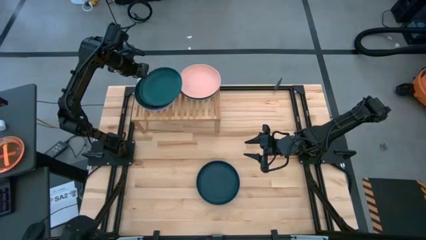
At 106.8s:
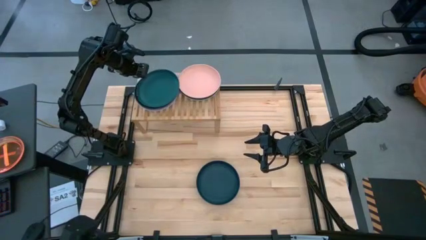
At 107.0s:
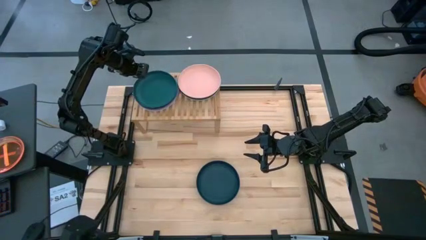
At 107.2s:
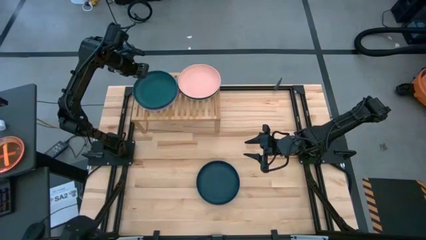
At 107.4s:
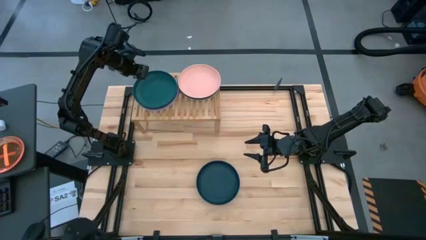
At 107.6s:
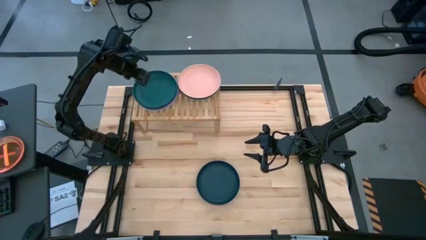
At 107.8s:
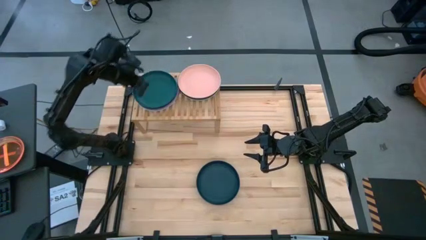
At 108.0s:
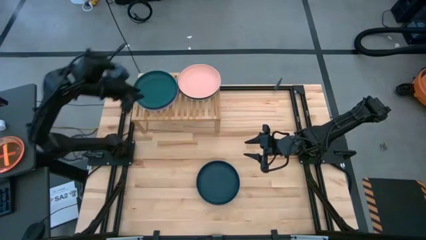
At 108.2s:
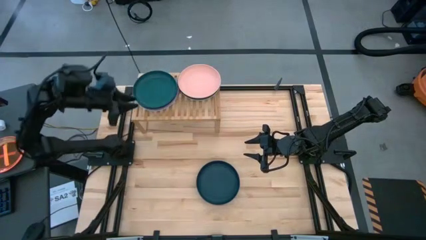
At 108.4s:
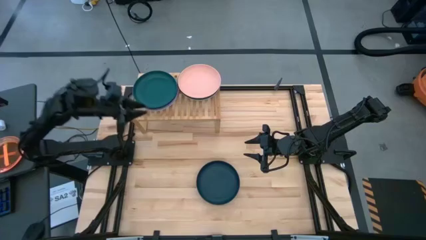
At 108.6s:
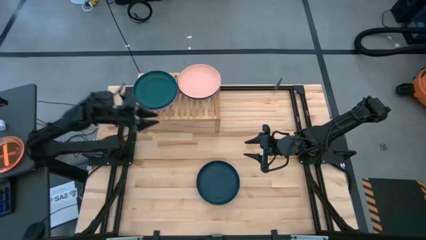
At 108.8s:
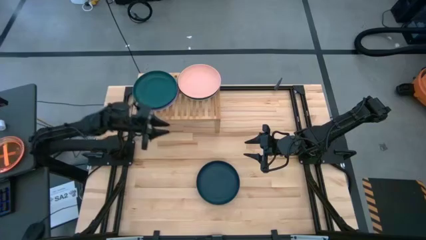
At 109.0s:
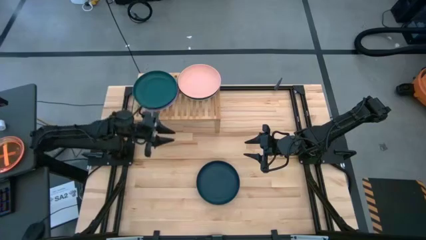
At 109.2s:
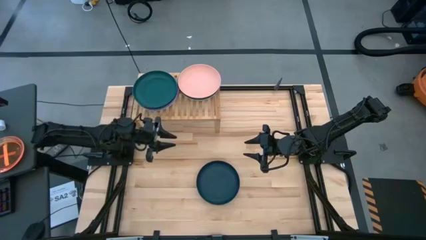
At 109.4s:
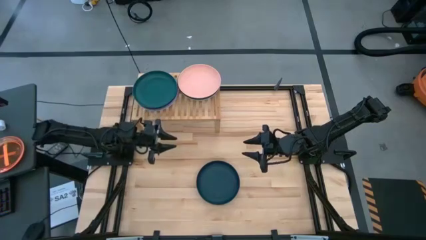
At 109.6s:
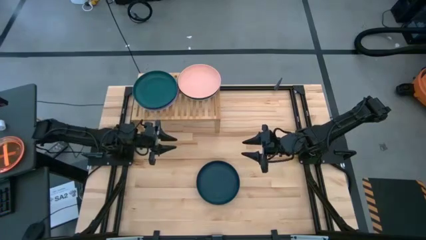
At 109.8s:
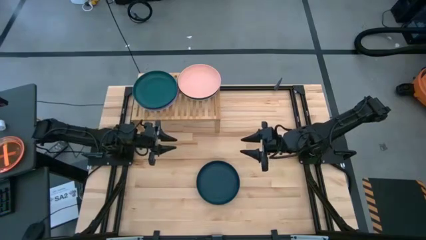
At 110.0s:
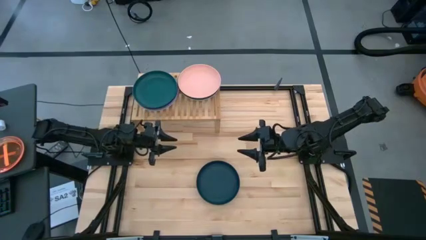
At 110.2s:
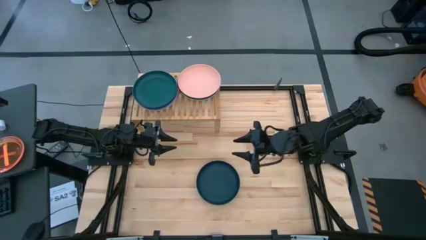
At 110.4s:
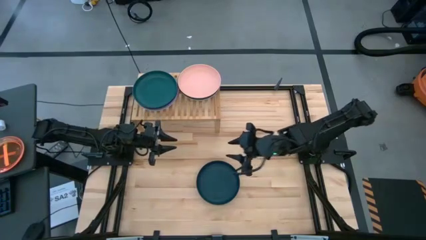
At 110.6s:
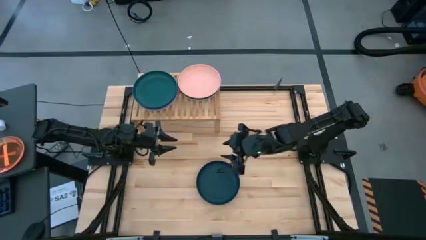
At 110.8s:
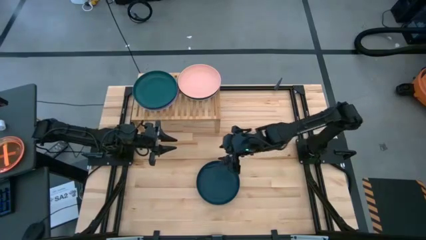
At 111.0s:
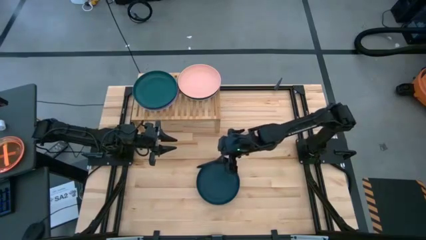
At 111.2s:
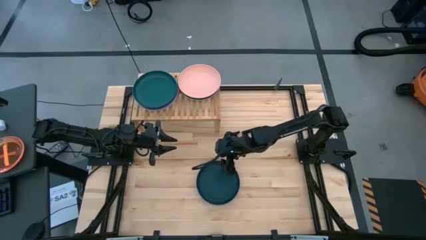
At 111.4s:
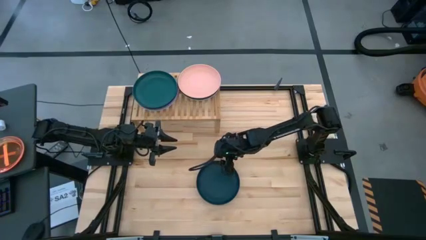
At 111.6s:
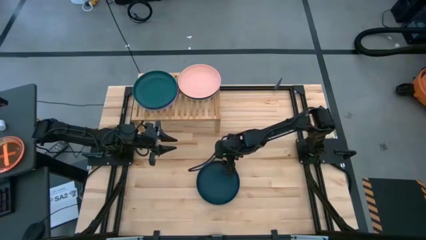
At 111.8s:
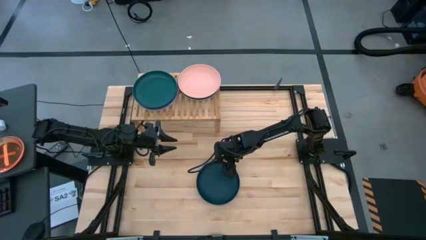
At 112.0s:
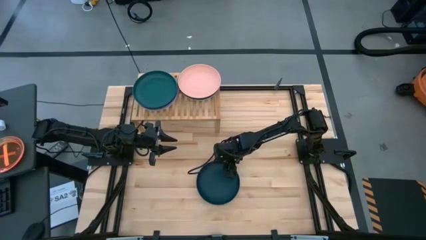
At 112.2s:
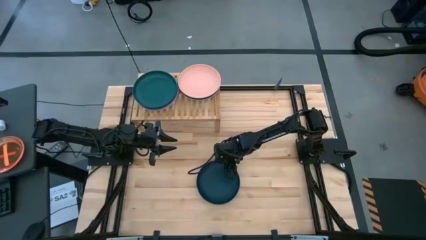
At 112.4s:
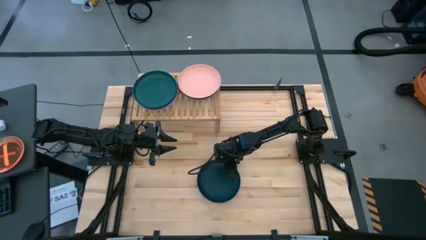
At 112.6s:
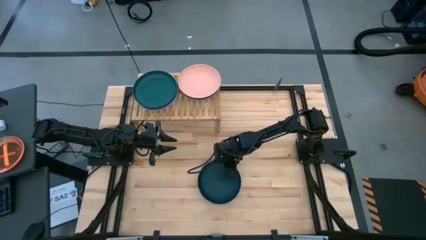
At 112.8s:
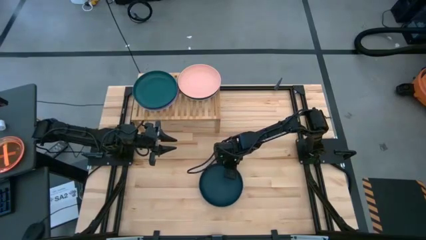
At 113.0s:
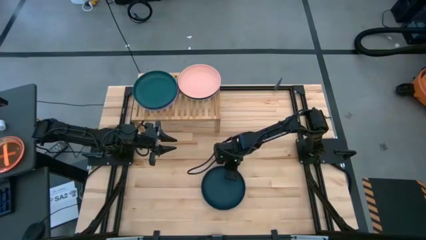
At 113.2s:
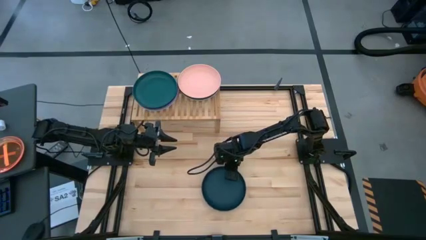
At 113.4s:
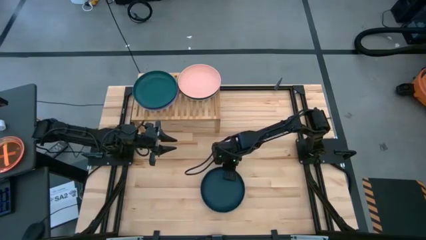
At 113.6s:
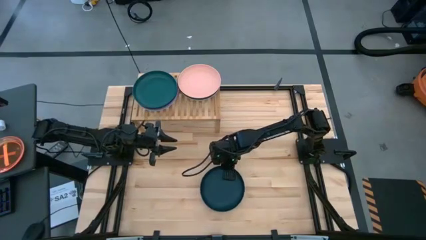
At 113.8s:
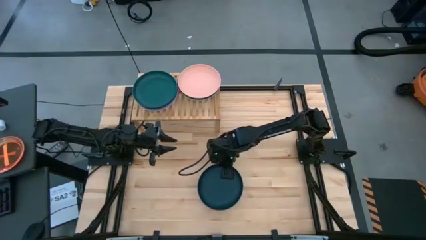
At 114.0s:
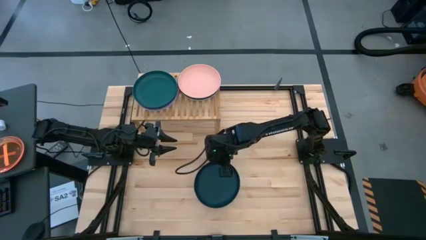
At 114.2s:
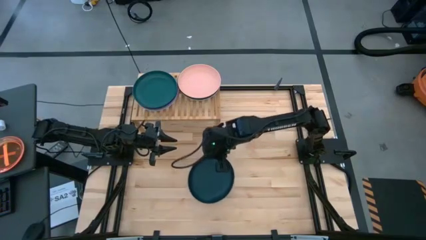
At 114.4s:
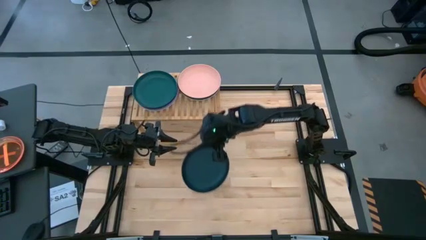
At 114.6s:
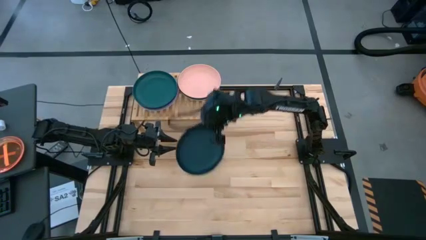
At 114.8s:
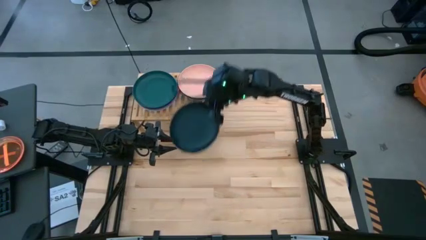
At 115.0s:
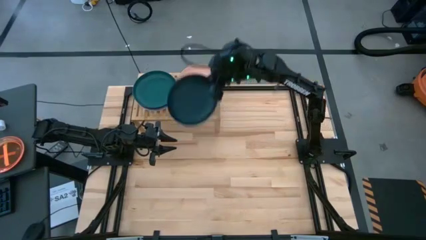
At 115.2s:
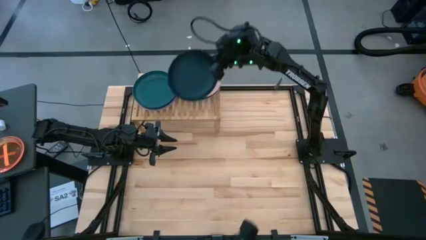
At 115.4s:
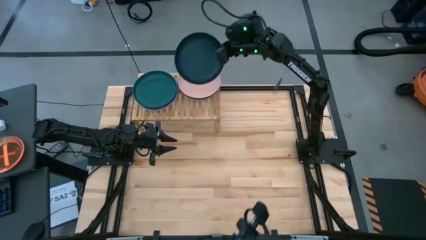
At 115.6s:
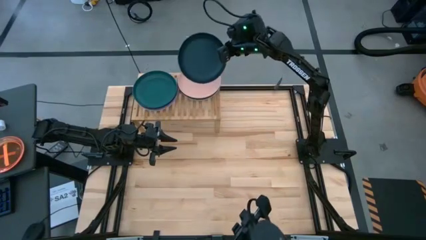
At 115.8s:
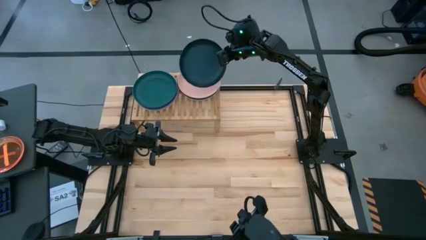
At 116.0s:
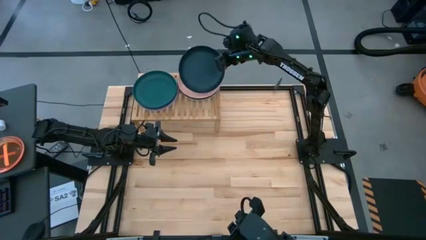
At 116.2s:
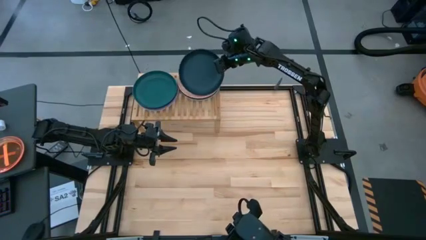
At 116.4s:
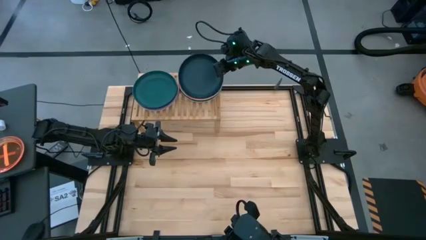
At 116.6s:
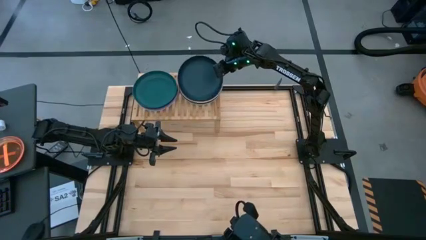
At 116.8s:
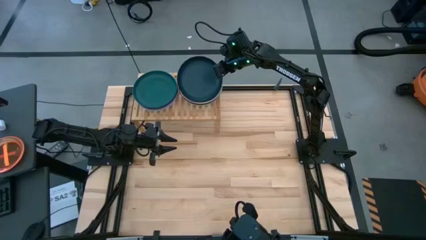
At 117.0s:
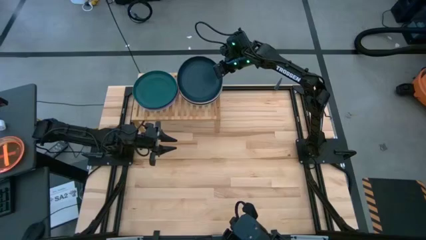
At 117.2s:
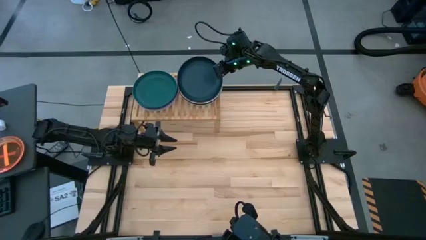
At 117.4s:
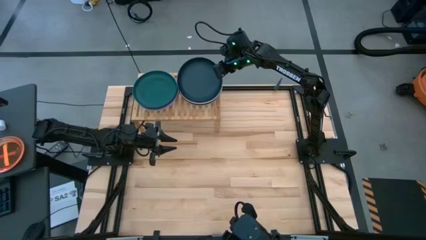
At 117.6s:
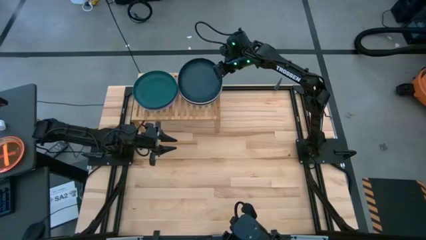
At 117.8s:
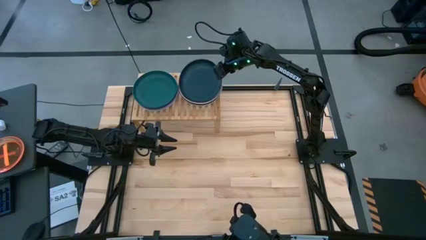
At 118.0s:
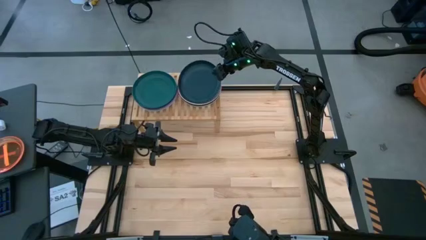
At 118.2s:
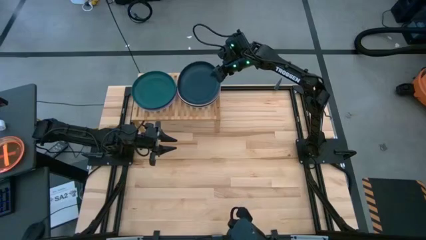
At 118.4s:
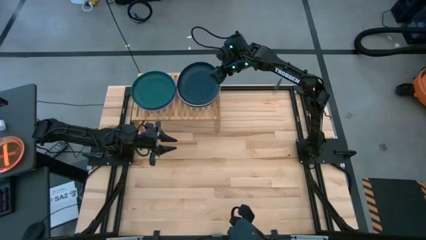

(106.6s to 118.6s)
Task: Place and stack plates onto a shelf
Stack the dark blue plate on the top of the light pink plate on the shelf

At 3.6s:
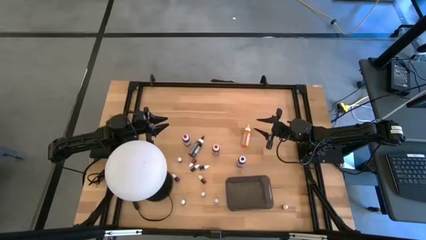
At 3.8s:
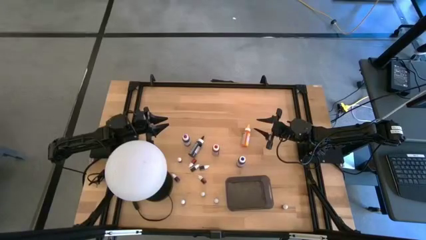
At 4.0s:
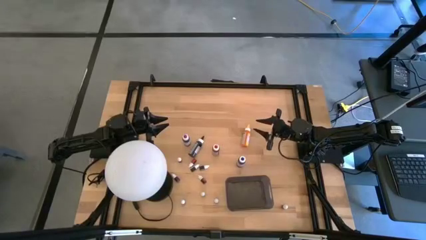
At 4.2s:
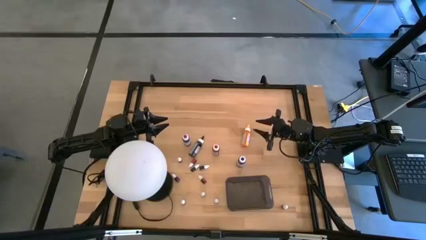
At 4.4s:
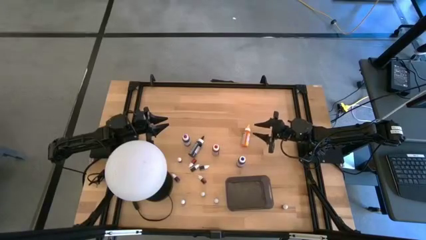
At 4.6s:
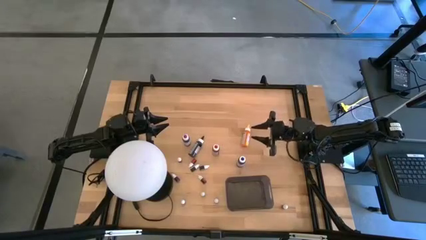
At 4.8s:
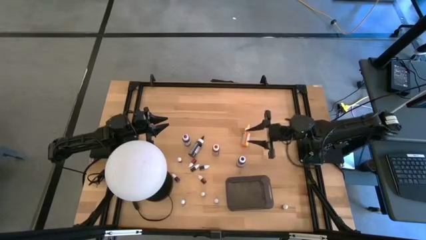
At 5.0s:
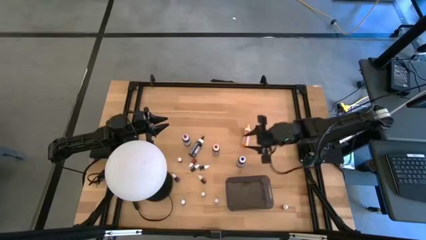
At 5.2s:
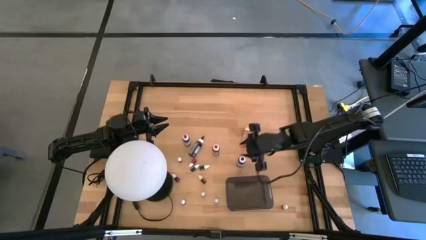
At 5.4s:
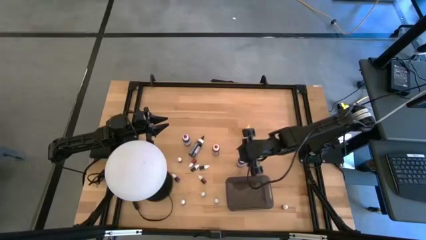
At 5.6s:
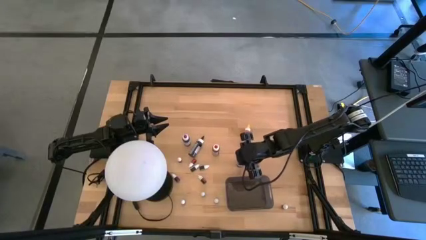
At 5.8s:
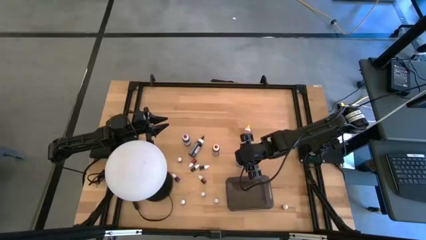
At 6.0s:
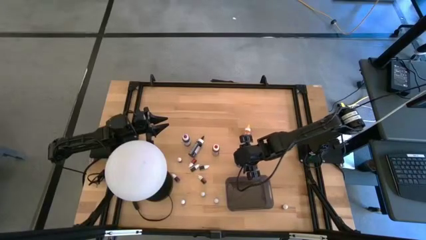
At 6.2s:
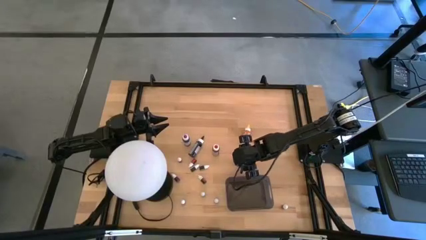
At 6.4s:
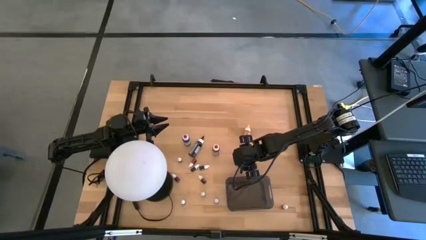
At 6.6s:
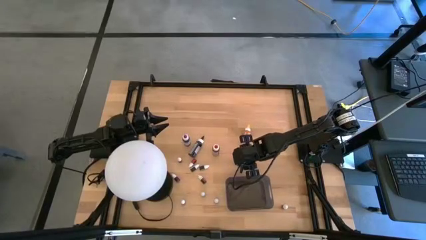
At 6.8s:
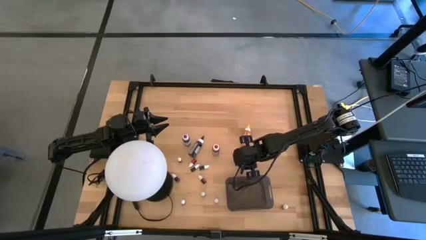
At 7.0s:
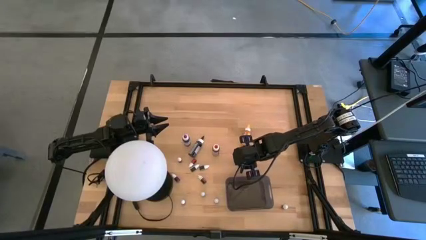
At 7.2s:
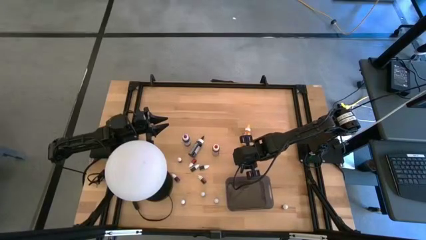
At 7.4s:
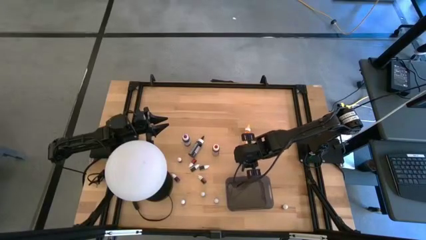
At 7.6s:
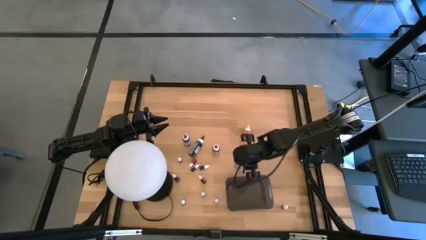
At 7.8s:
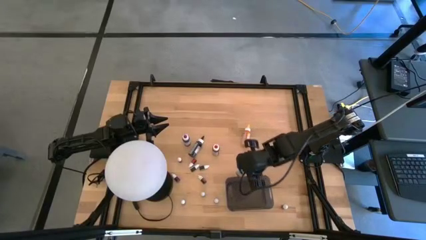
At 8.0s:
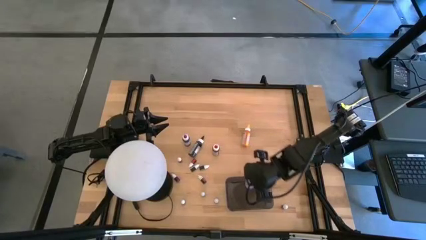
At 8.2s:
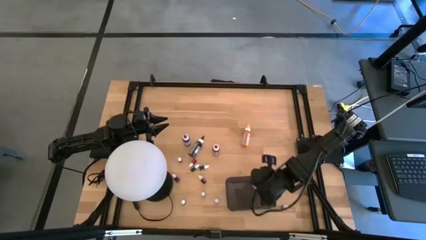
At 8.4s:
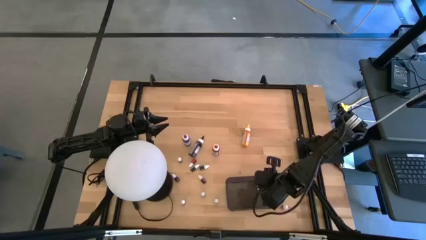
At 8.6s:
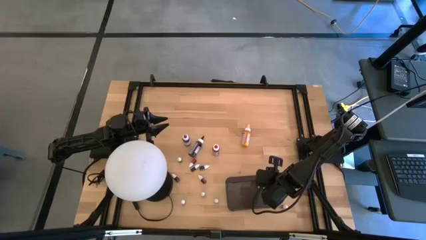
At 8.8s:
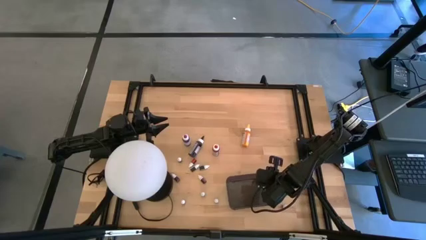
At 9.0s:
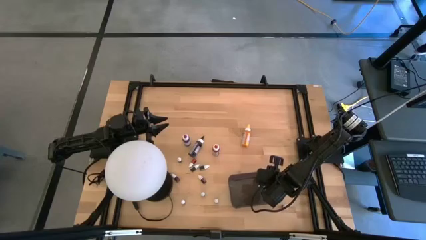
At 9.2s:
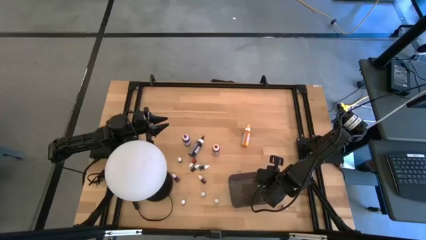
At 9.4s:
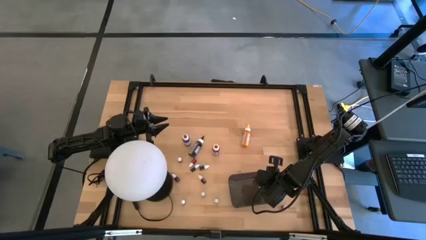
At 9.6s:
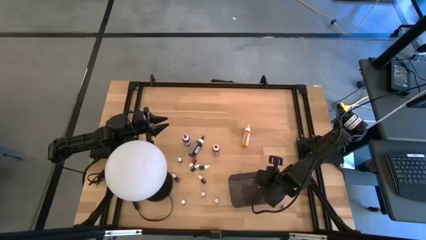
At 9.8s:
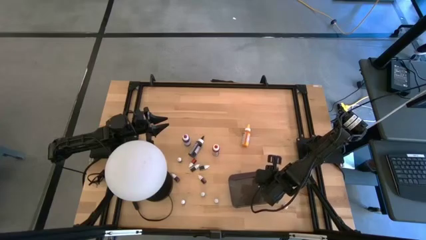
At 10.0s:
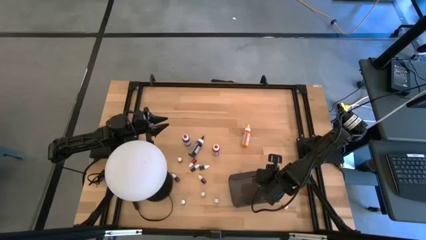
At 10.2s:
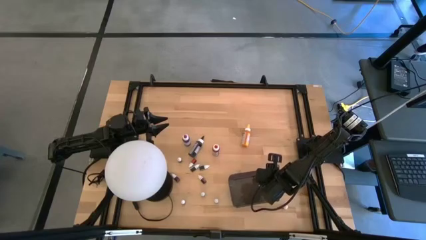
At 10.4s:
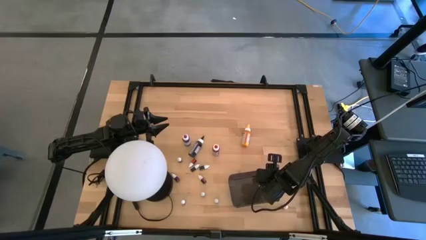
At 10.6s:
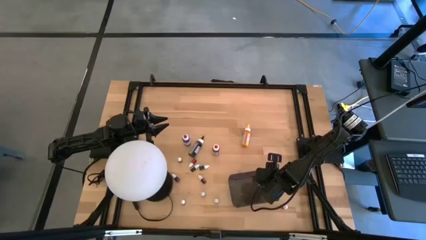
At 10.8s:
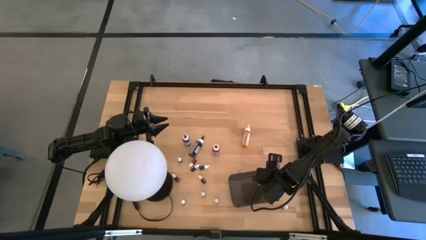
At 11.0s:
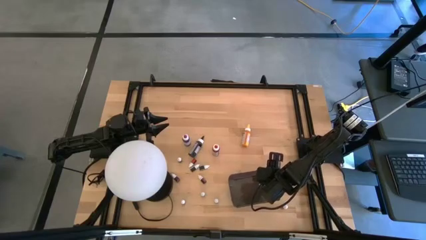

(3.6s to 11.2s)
Task: Pick & Place food coloring
Put the large blue food coloring bottle into the bin
